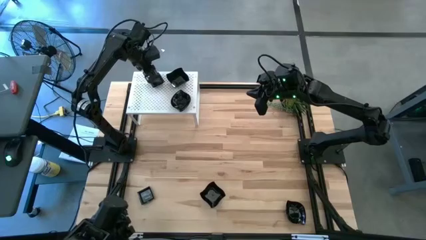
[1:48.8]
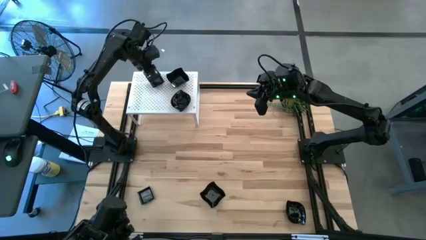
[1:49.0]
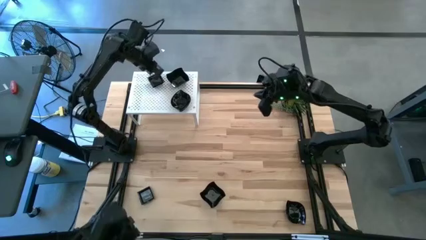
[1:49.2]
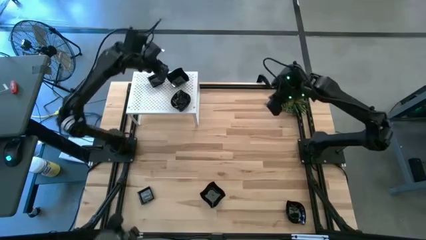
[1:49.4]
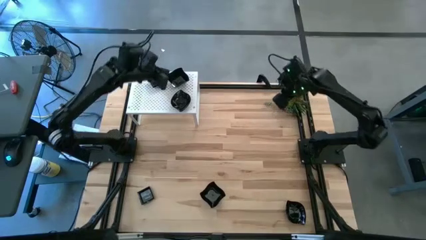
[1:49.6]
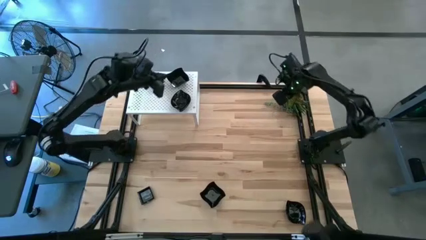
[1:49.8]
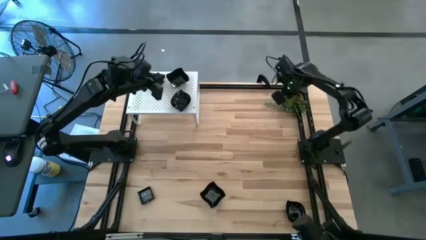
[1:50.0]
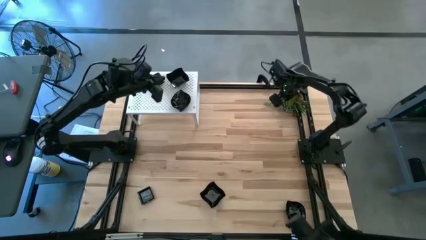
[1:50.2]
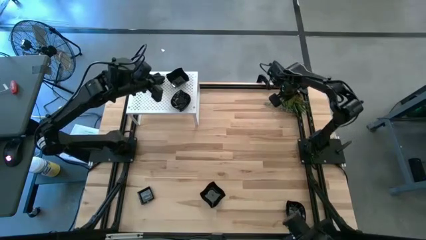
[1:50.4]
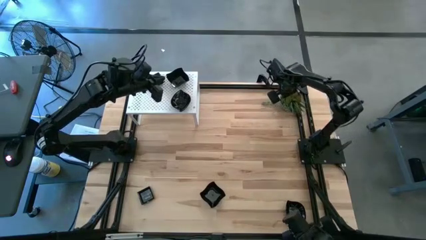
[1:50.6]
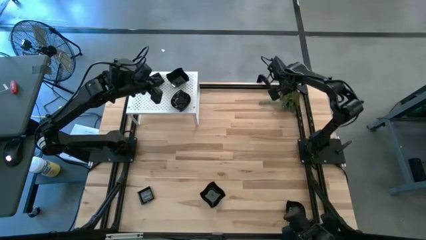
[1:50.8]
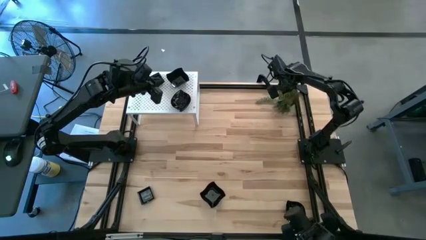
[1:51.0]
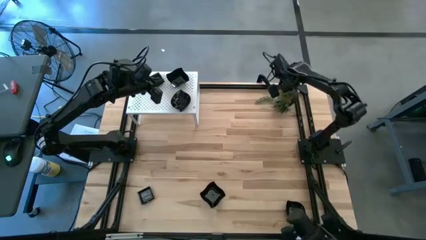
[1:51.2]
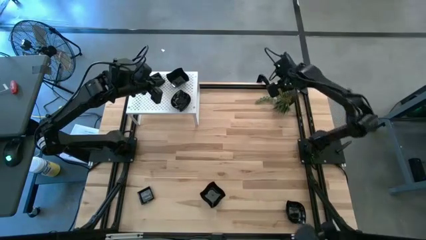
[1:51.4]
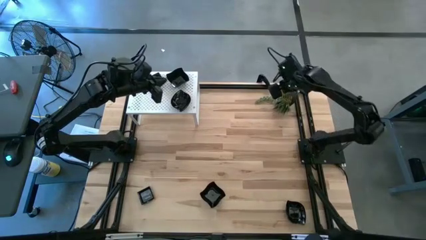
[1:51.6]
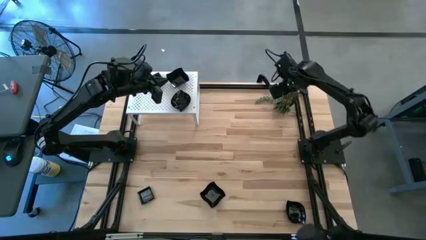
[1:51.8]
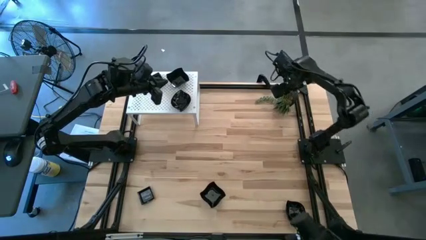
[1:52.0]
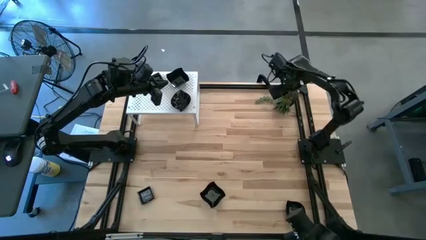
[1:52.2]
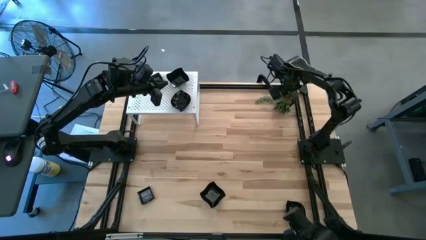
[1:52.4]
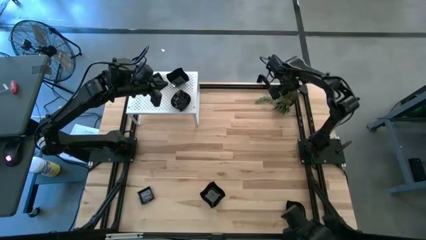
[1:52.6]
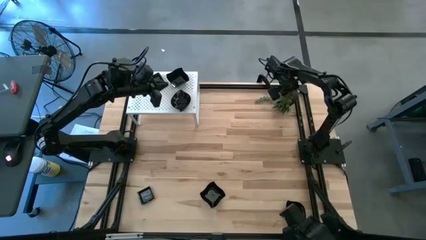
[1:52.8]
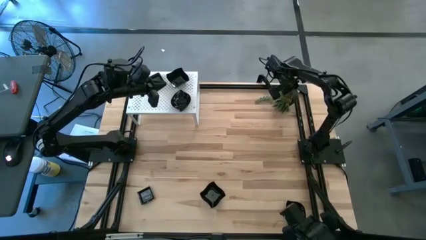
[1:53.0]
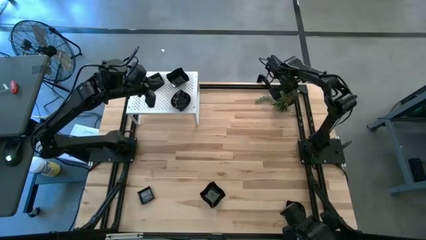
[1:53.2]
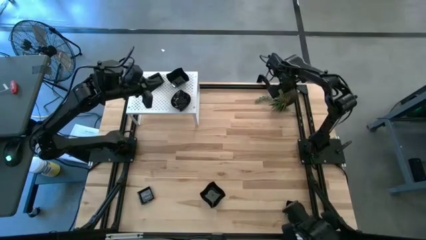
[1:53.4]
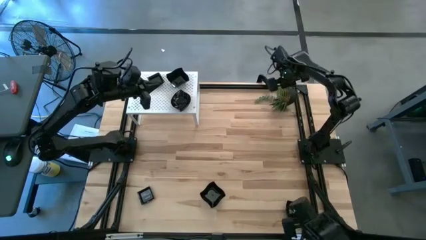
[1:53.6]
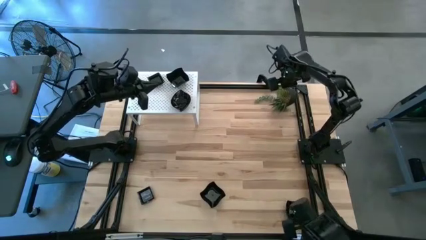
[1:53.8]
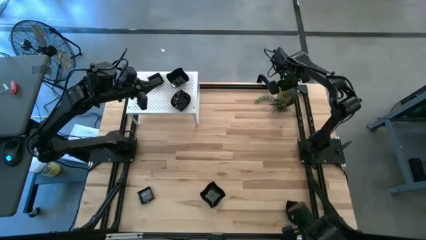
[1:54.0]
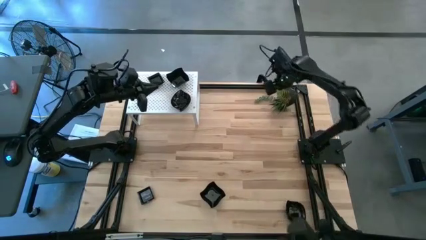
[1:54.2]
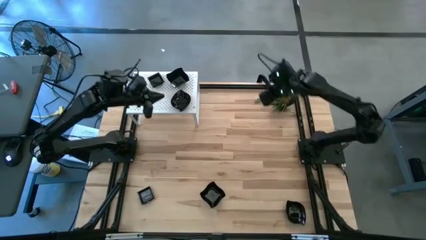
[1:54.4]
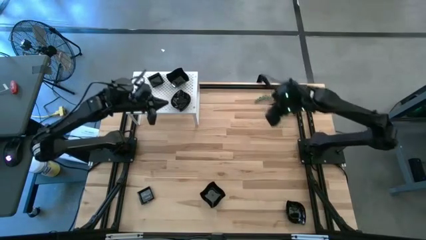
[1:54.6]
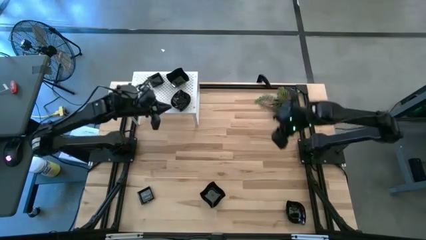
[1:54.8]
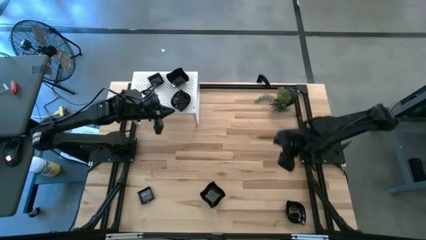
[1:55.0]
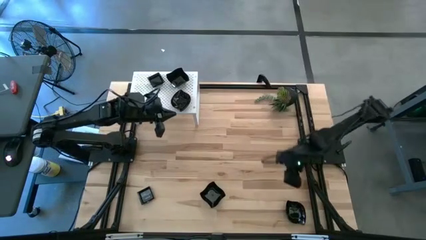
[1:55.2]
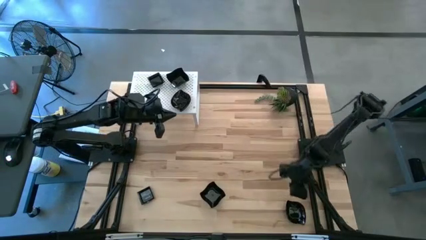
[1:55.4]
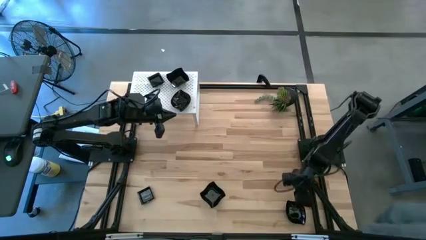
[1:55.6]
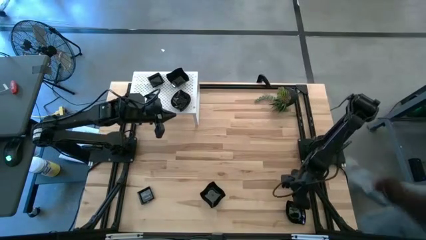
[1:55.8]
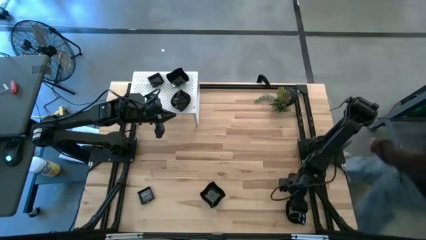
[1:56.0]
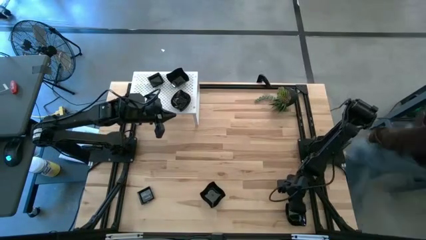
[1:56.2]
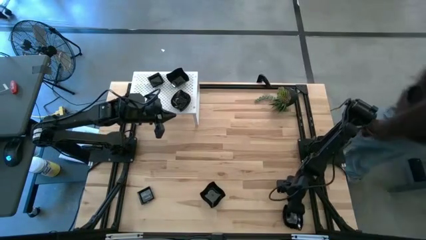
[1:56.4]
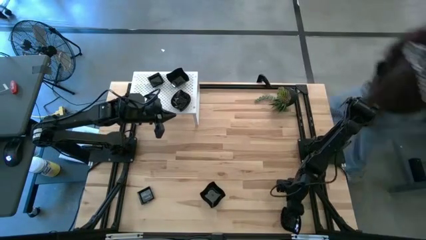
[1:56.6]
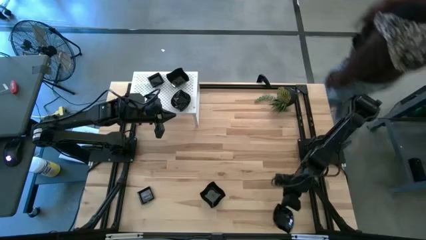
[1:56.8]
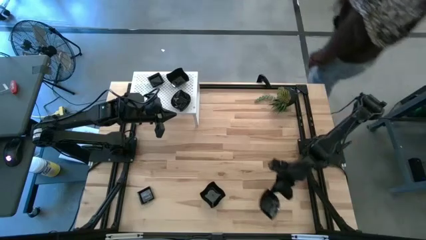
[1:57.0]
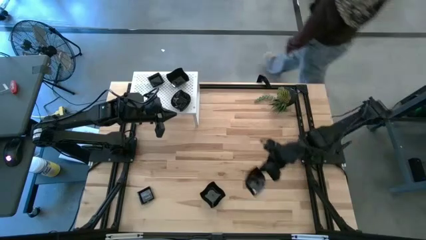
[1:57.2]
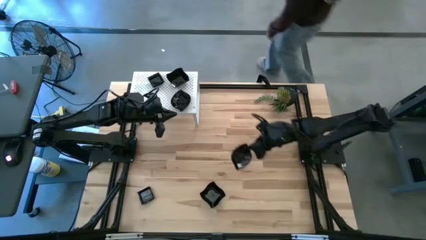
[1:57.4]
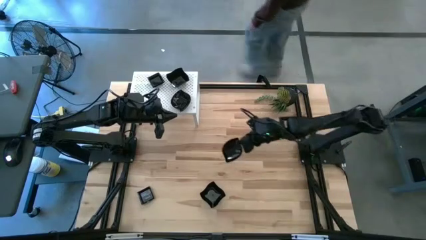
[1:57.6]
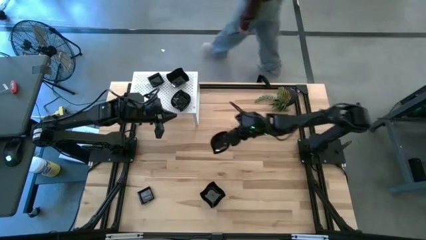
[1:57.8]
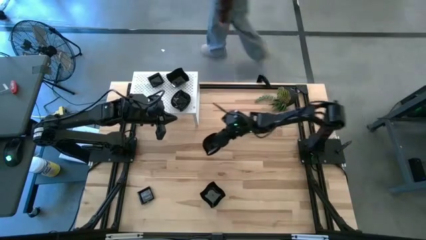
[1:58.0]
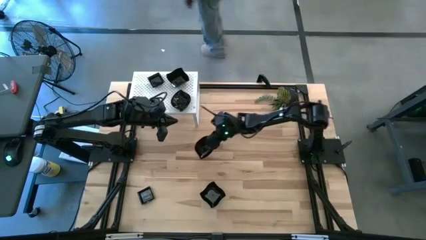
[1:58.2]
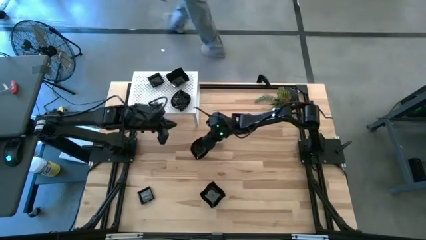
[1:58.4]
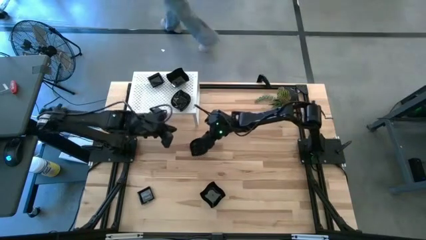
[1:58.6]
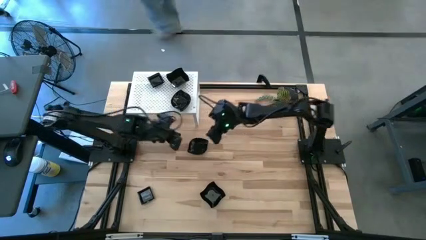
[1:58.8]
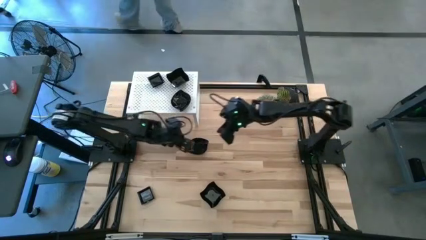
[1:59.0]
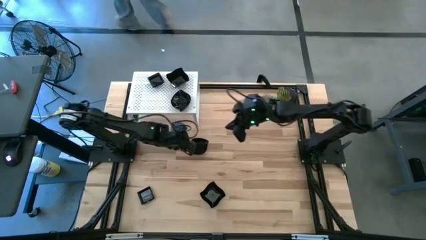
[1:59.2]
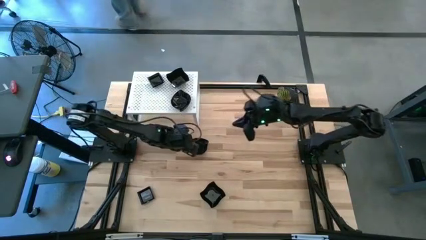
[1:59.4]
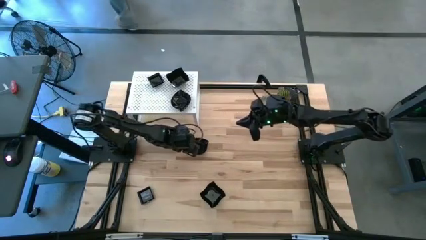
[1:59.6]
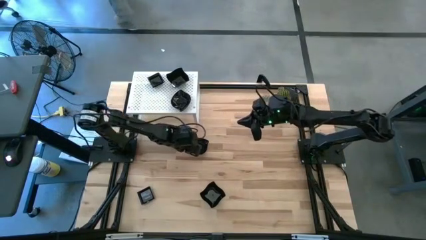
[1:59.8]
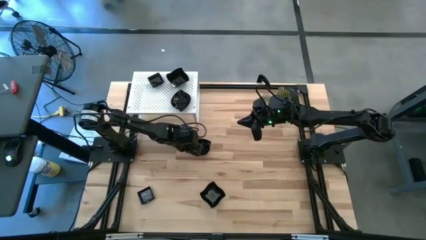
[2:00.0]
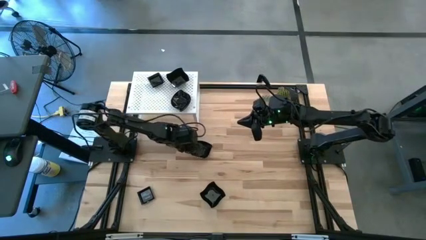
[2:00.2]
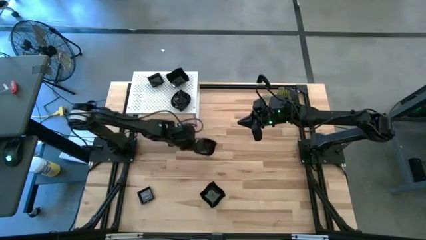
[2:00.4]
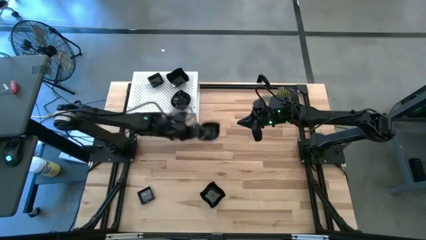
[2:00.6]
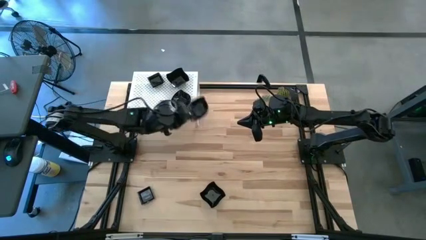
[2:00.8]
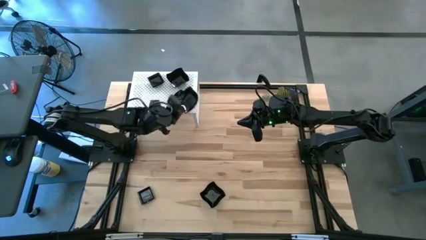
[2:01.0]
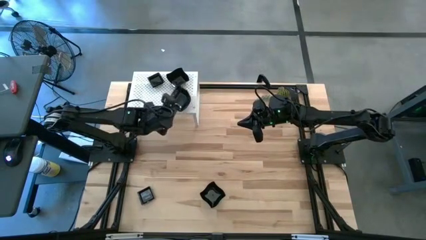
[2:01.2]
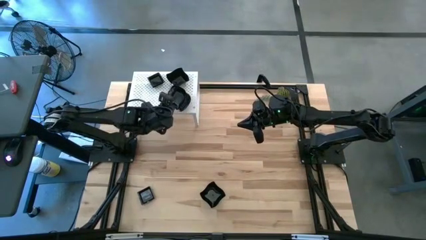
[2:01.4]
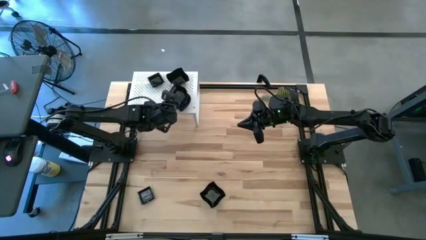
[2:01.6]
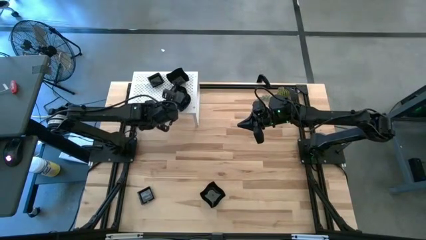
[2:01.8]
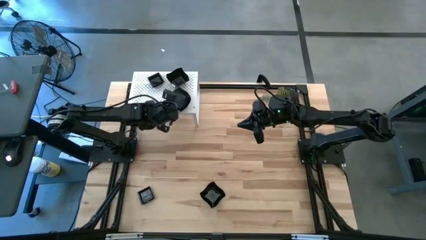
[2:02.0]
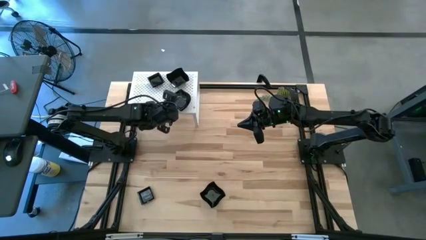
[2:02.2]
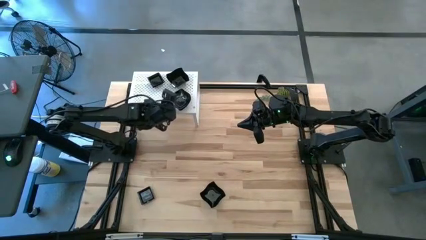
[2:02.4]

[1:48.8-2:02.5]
Task: Pick & Place Mini shaped plates
Stack the black leaf shaped plate on top of the other black leaf shaped plate on the shelf
